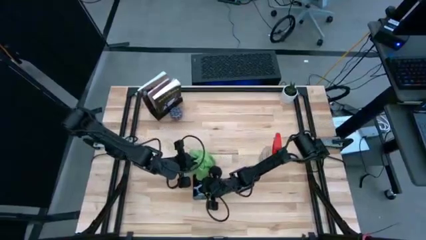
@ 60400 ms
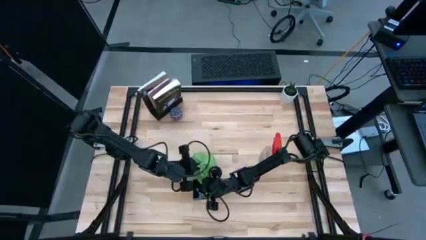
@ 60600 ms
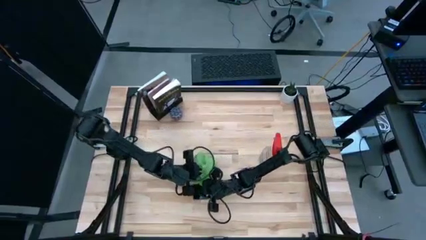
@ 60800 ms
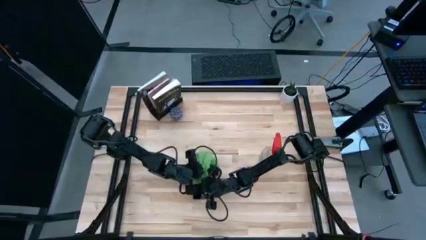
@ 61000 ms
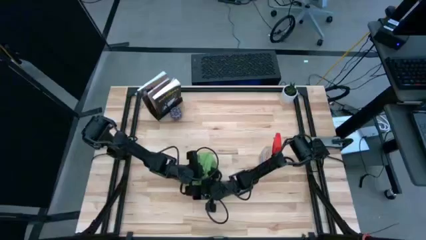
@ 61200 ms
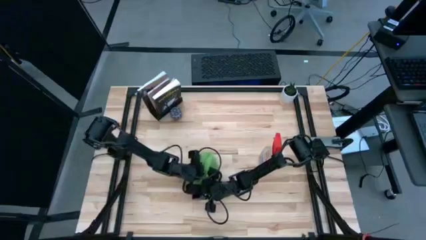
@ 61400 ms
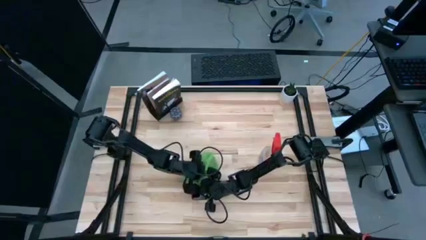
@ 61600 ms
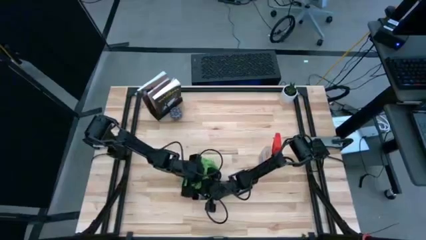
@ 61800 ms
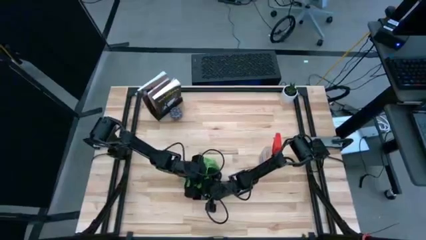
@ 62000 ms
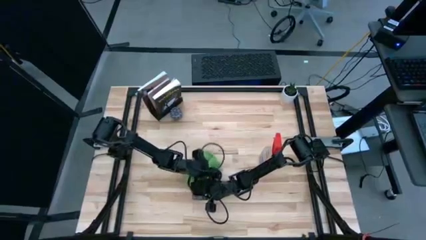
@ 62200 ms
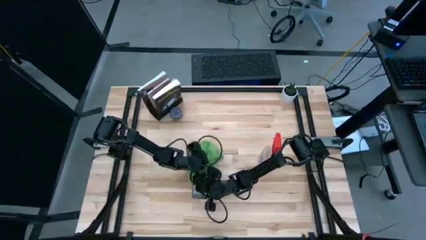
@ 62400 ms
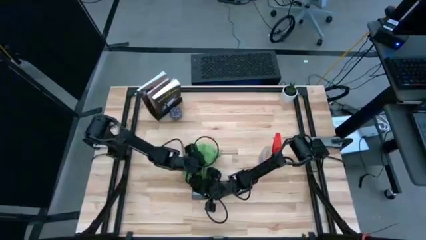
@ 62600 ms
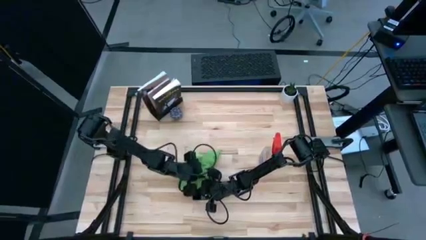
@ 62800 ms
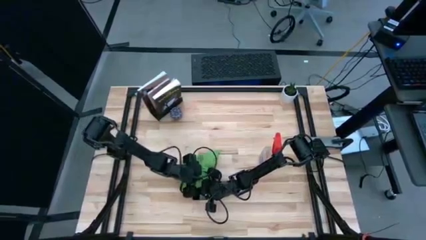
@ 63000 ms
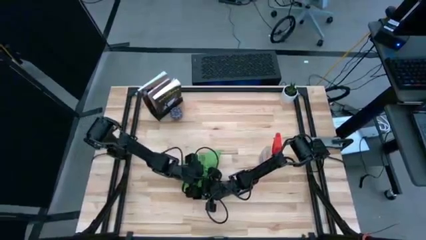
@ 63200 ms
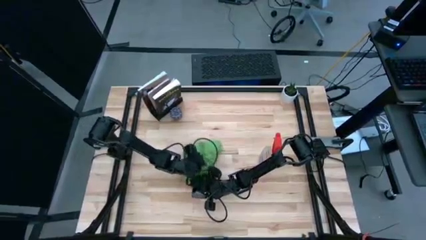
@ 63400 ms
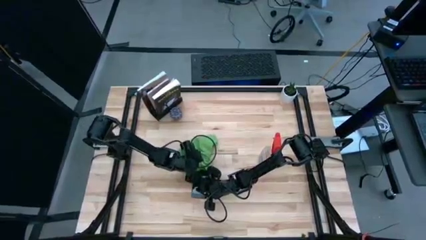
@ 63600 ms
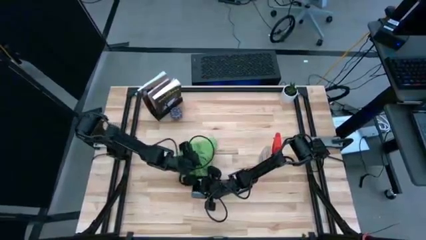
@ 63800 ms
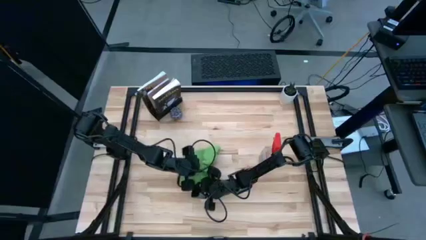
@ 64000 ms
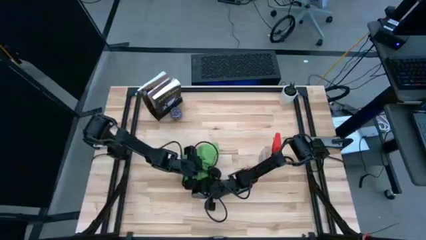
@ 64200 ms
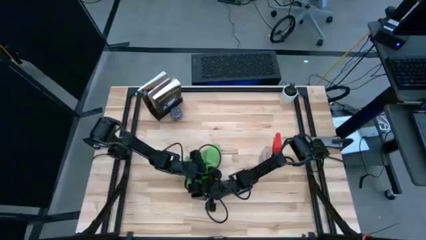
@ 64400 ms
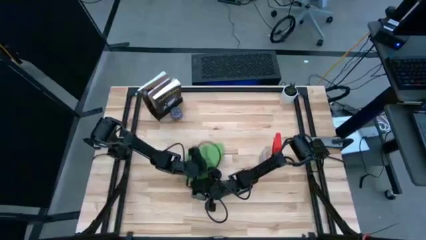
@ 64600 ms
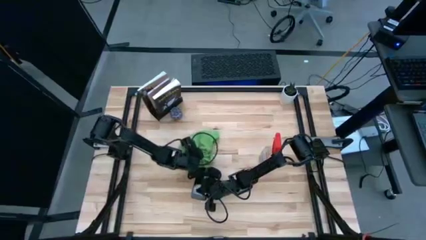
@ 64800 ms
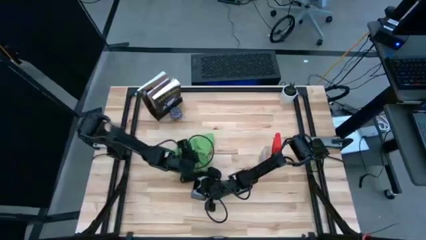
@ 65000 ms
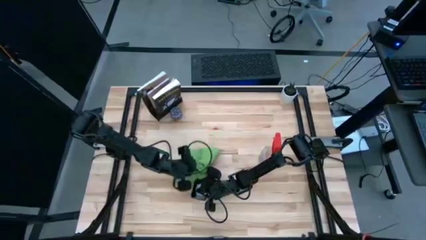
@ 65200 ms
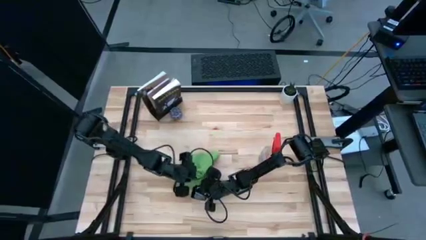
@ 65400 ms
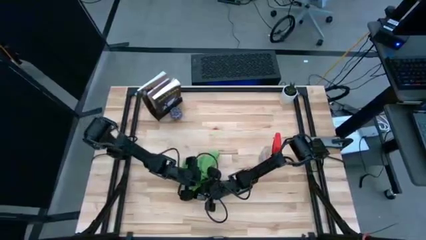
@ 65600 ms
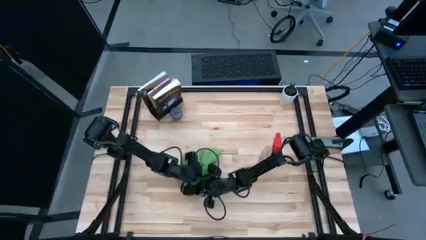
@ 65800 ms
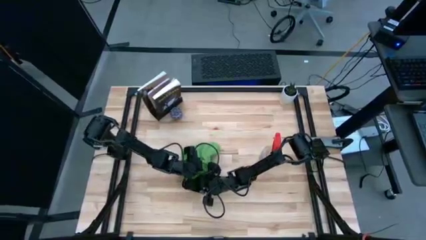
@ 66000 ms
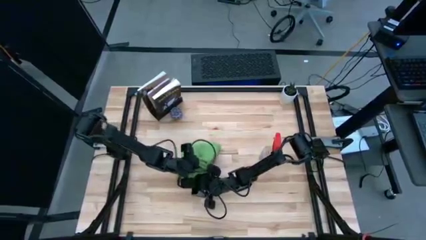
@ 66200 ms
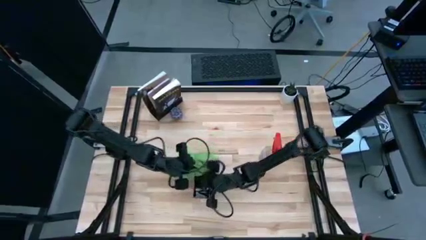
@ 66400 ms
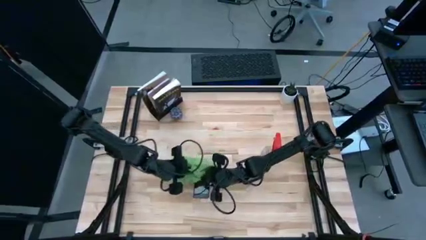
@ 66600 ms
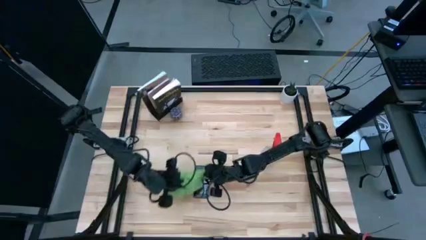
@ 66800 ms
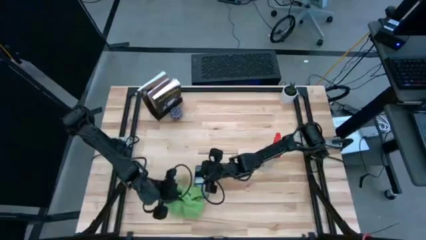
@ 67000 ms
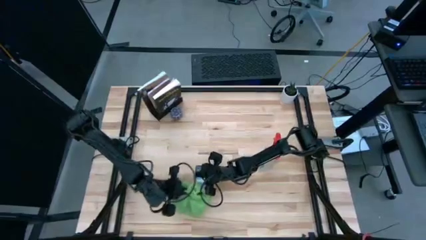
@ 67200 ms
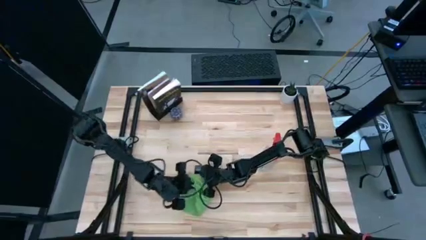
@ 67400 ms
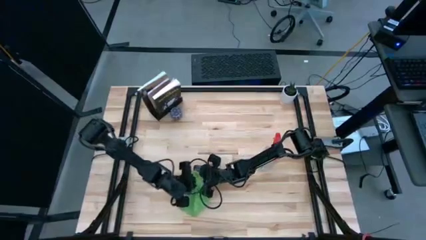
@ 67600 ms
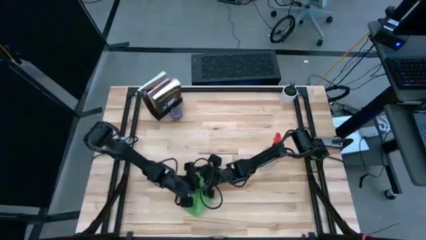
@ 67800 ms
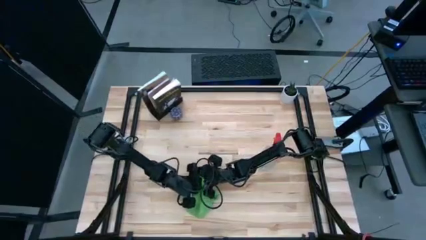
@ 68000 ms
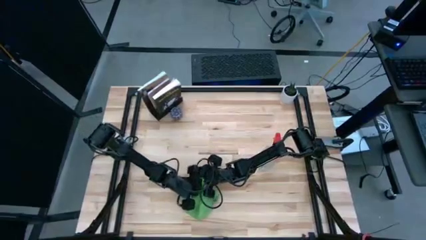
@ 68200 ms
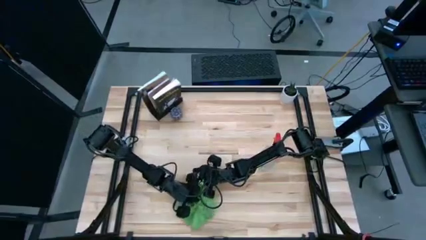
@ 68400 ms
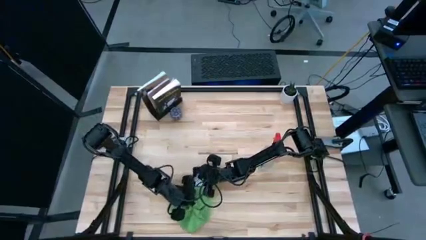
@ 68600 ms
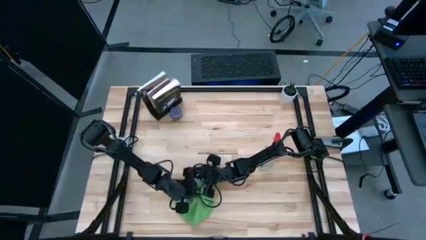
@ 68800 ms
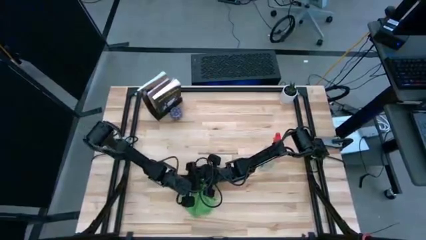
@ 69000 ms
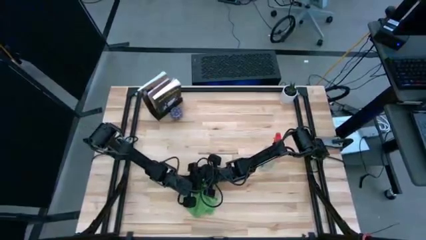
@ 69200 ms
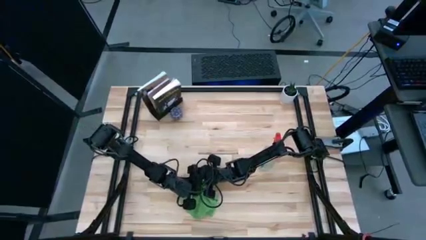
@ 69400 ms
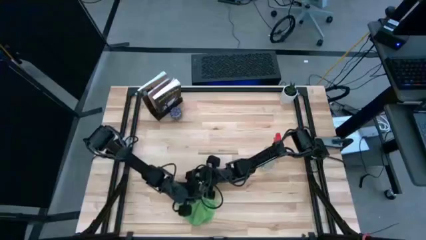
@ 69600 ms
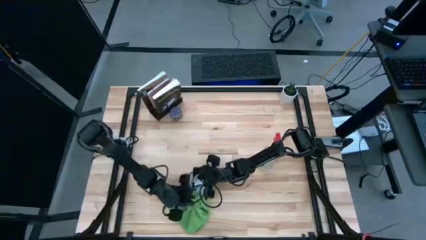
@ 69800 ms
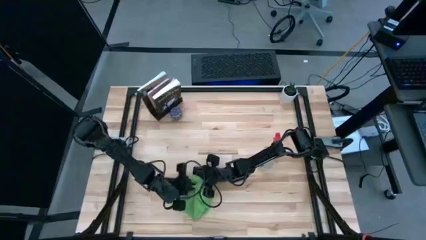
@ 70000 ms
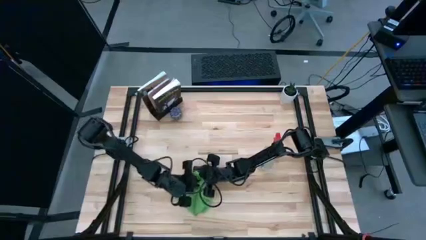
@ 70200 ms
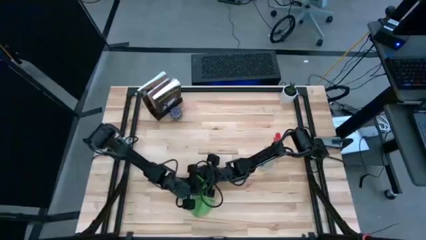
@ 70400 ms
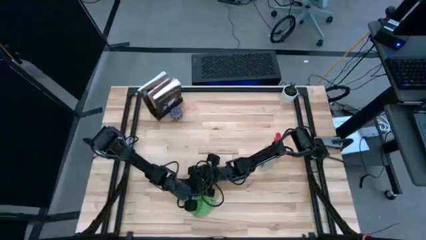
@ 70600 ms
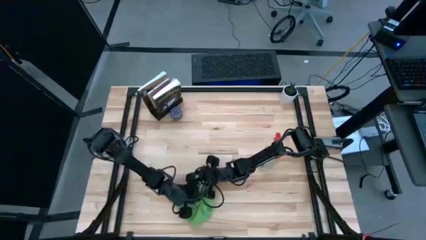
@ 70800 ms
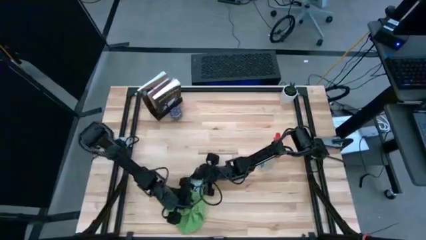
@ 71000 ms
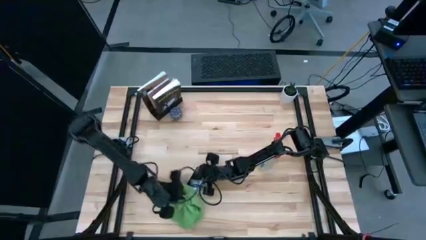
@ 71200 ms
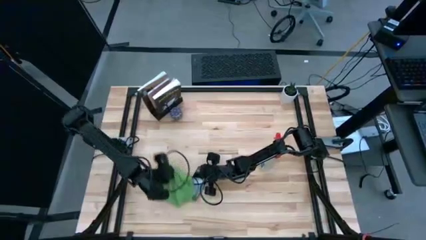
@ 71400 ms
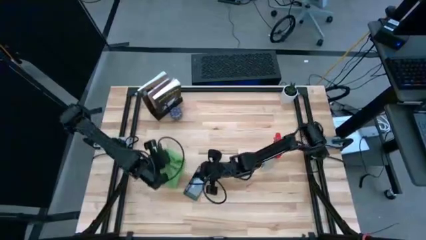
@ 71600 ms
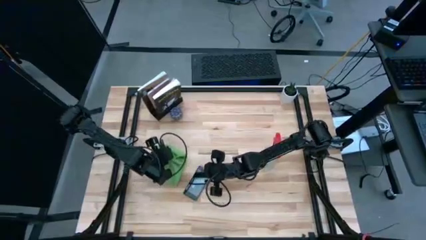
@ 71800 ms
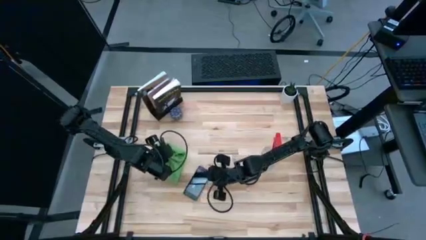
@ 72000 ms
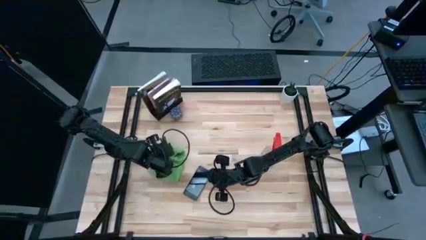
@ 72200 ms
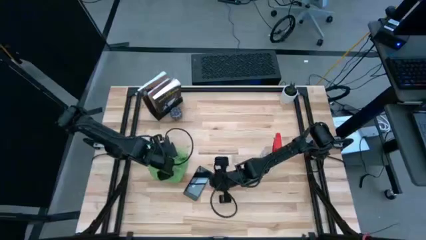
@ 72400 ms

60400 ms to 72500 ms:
Task: Apply microfiber cloth
Wipe the front of the pink cellphone with the green microfiber cloth
